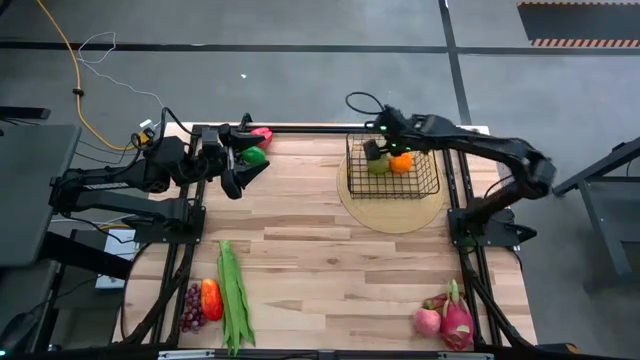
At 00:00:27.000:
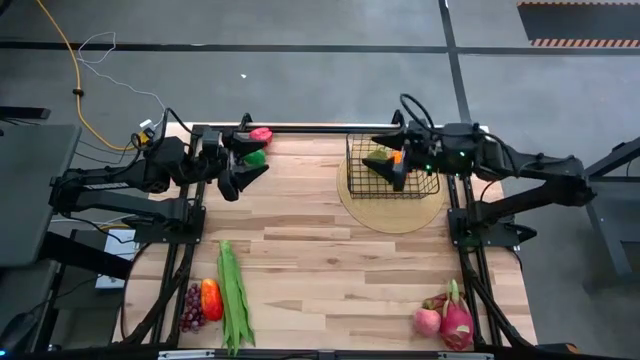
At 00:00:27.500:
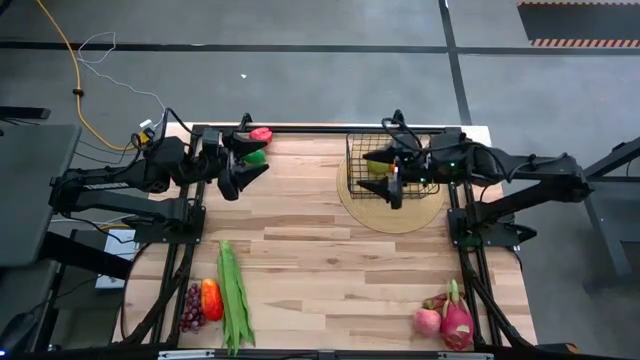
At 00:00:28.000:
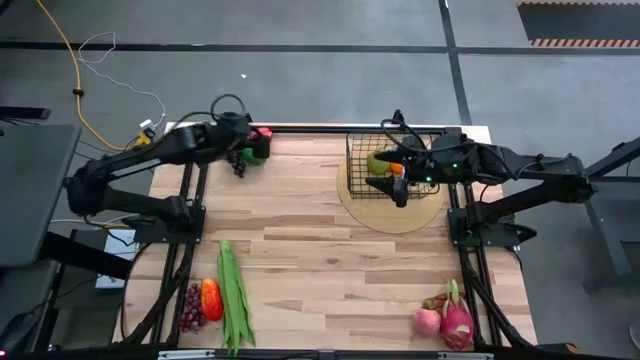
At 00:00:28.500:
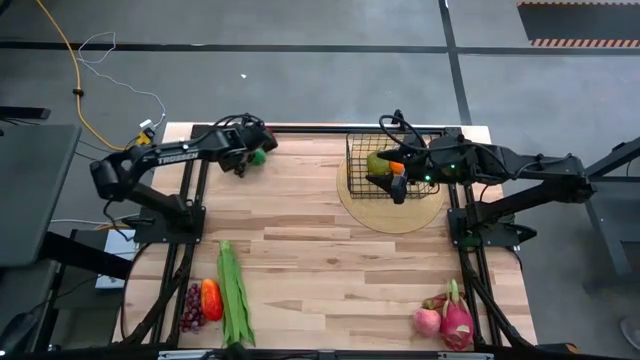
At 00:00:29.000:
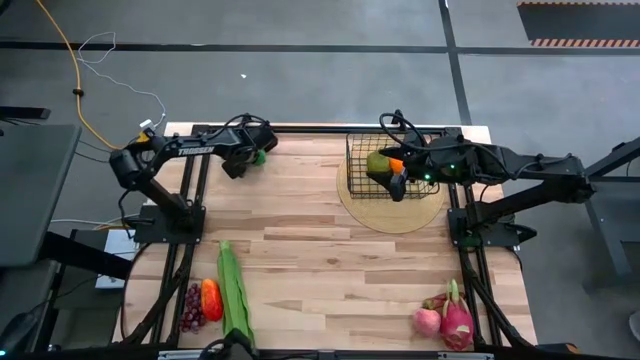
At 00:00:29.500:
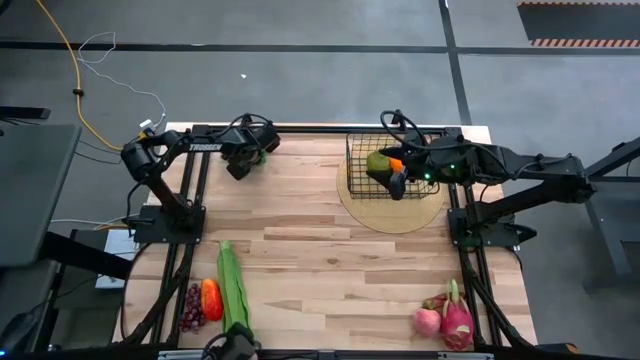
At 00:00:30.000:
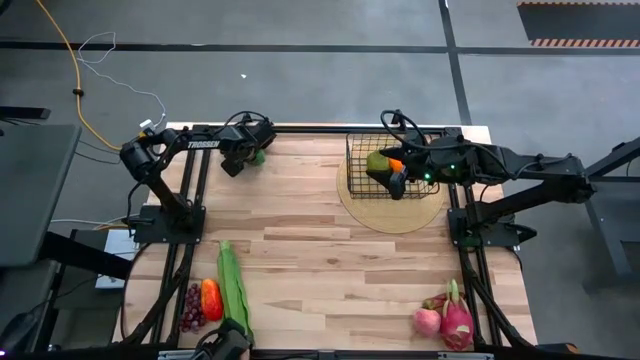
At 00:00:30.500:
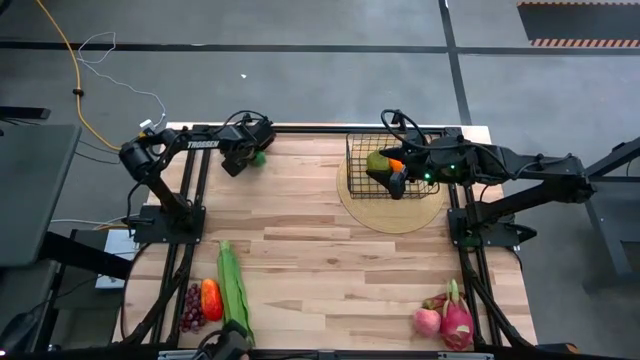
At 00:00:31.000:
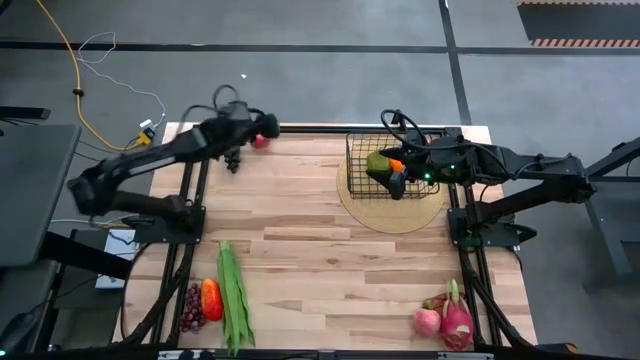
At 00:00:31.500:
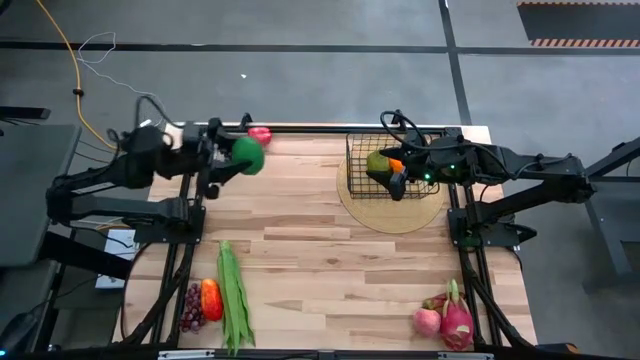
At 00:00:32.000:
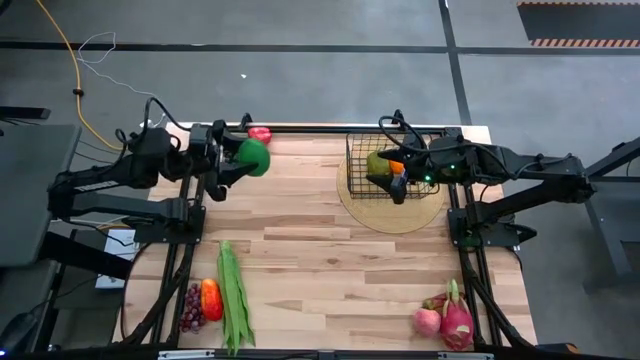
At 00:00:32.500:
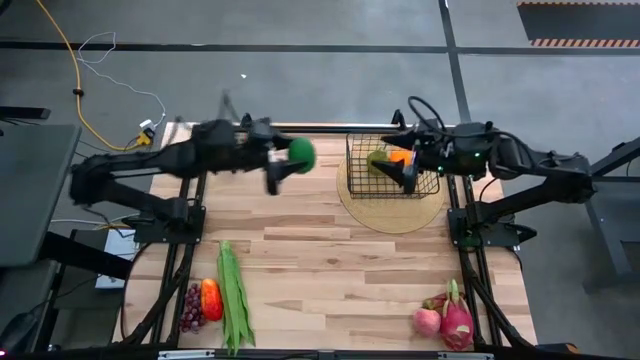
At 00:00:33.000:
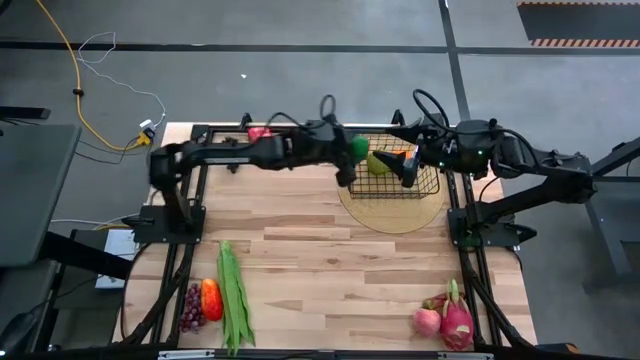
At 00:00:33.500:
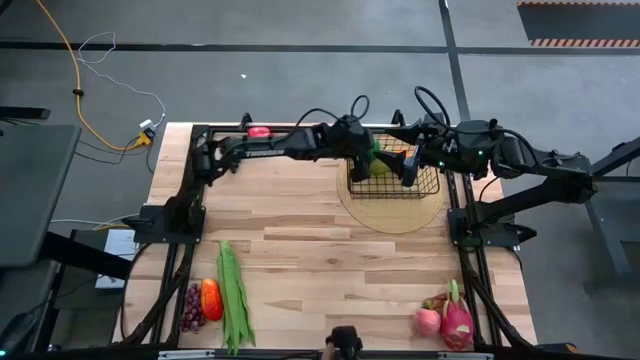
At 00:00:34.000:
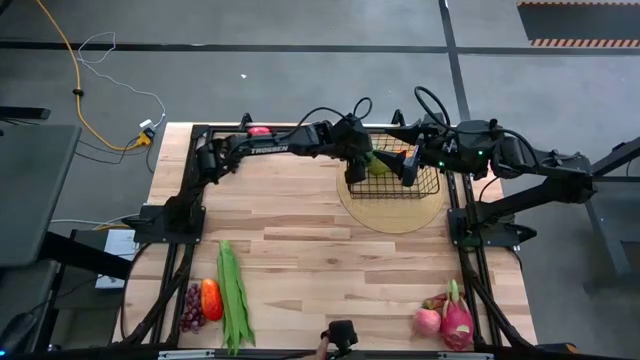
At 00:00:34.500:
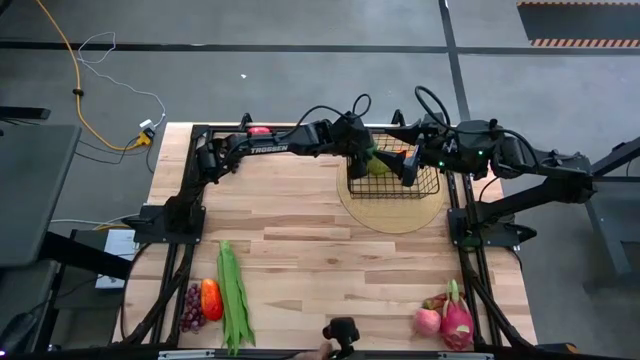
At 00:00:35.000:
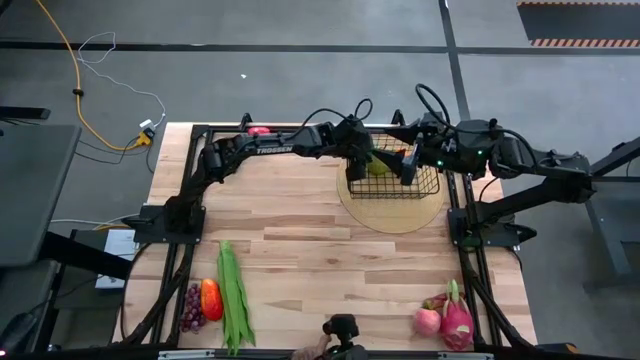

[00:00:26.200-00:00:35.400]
Task: Build produce basket
Put the green lime into the black wire basket

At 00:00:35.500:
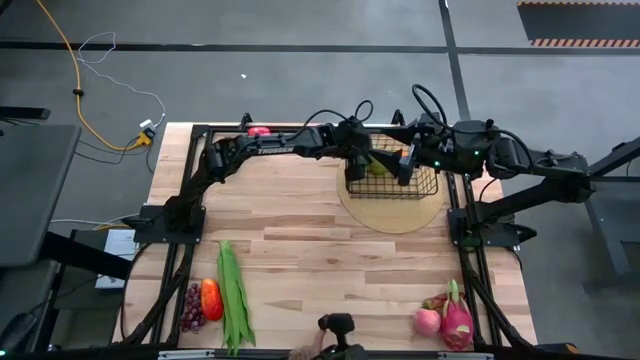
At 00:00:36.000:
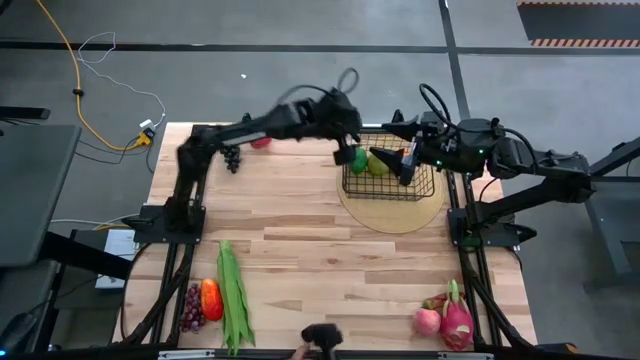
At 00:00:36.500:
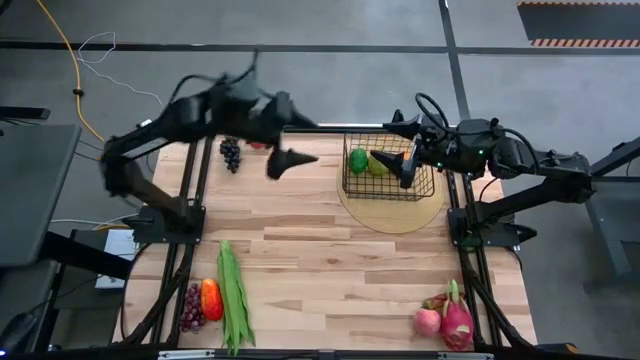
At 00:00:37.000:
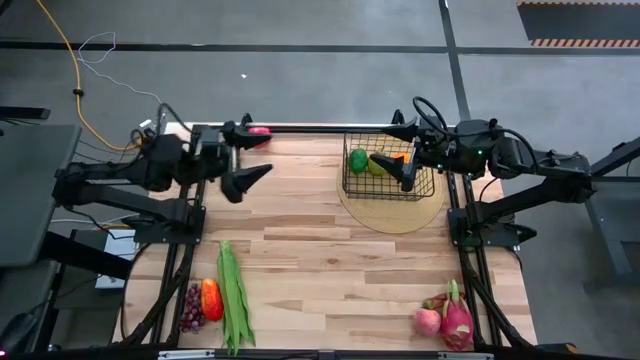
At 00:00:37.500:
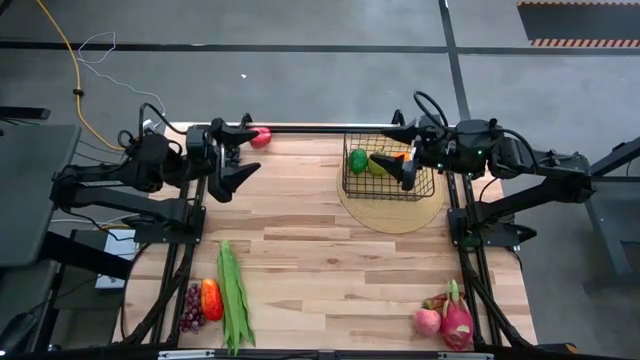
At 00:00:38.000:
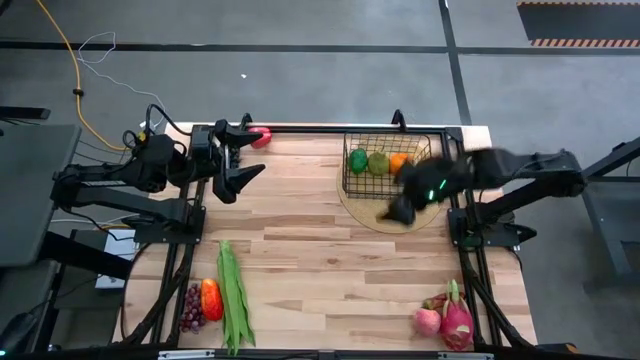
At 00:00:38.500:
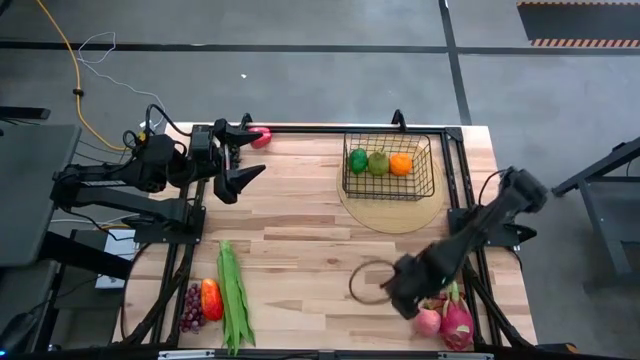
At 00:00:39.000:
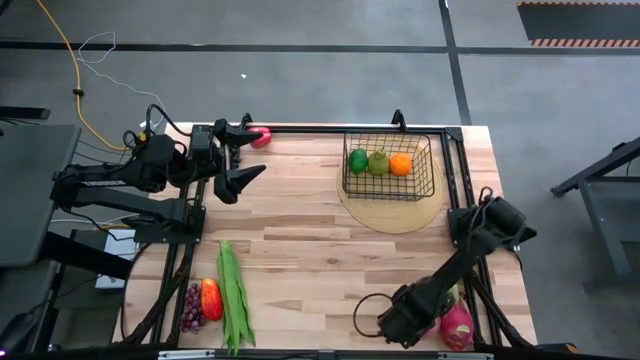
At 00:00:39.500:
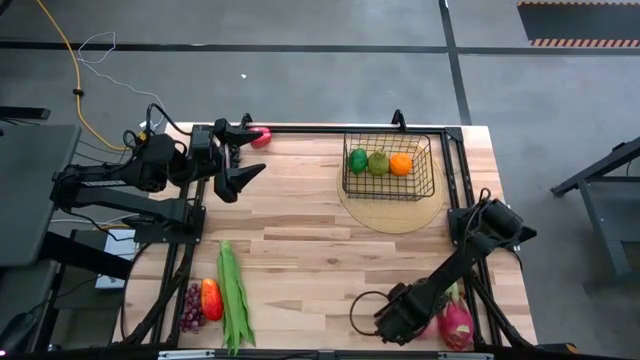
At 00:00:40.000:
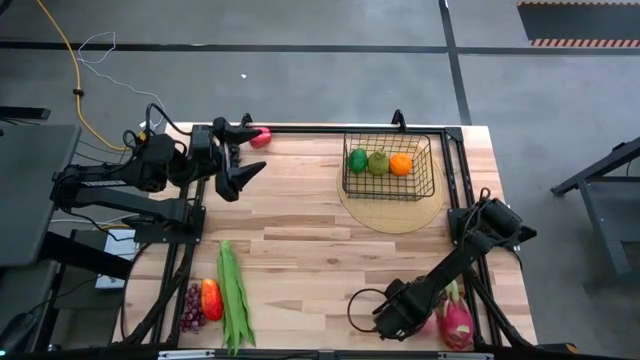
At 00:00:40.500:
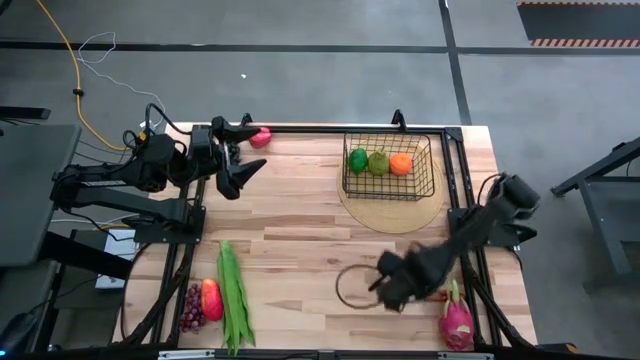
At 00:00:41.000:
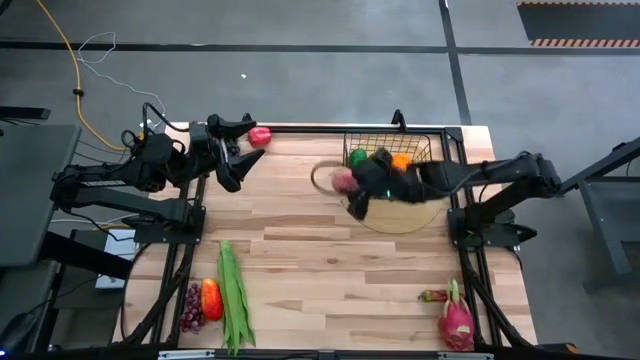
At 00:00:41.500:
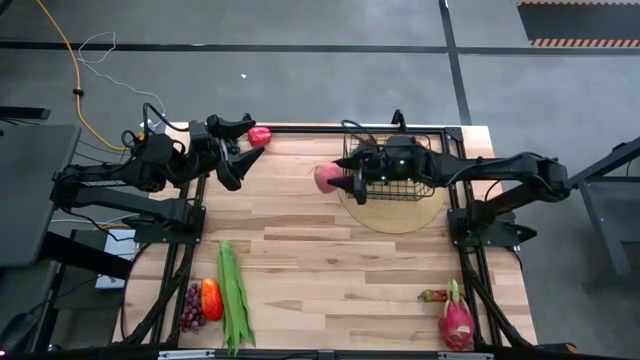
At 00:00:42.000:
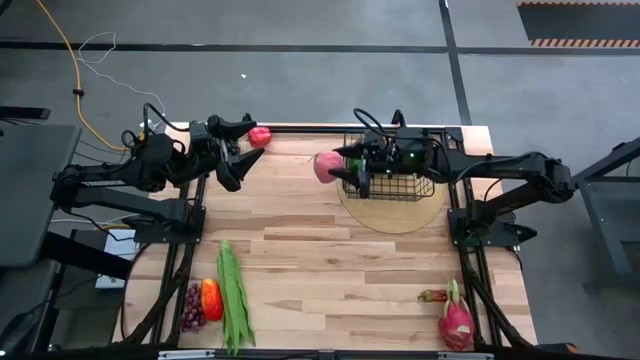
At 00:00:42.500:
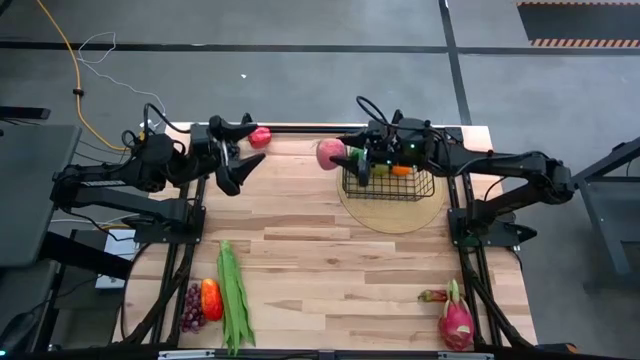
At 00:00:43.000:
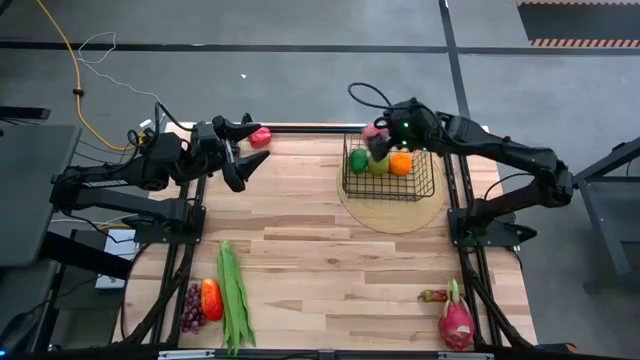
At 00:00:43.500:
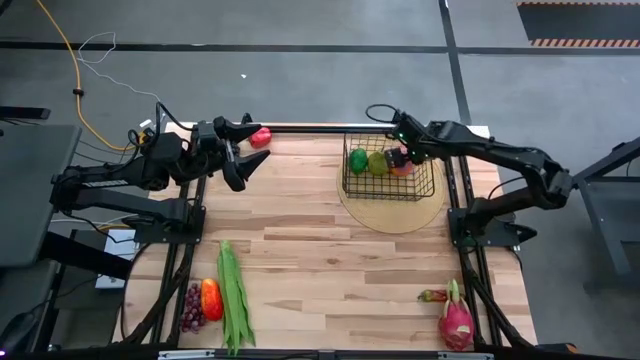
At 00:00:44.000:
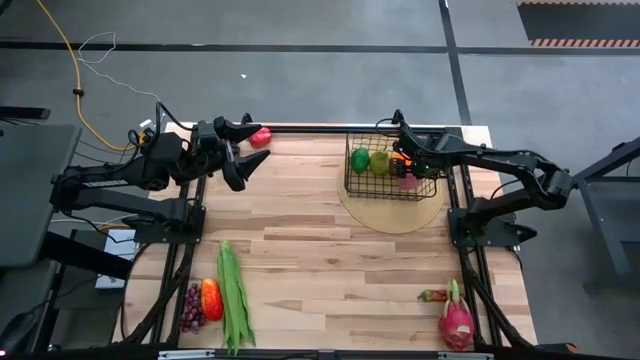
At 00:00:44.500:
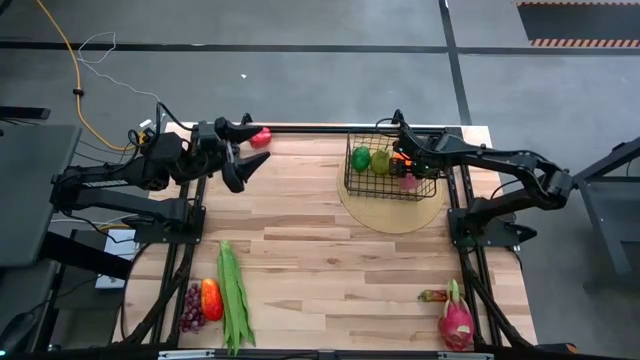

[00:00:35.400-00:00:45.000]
Put the peach into the black wire basket

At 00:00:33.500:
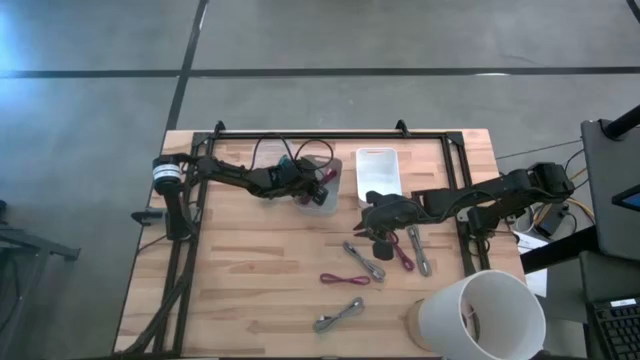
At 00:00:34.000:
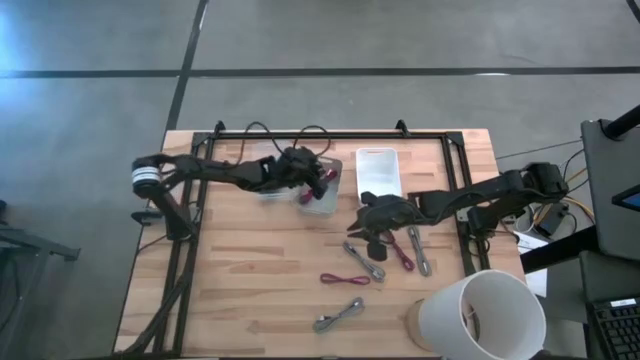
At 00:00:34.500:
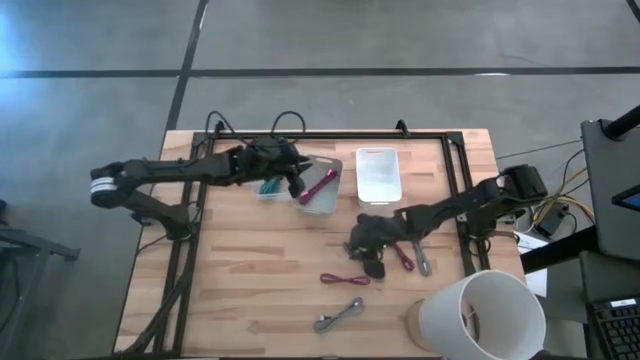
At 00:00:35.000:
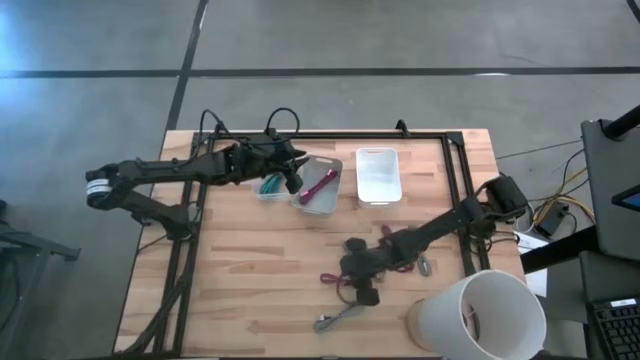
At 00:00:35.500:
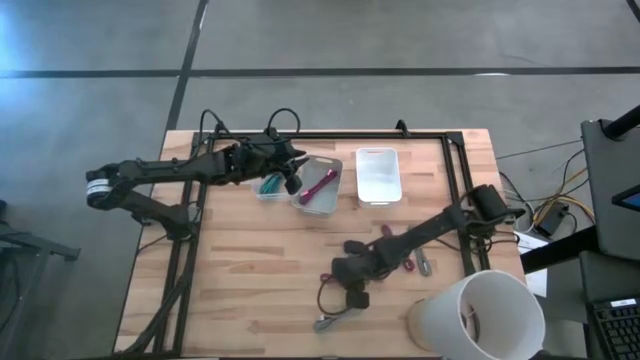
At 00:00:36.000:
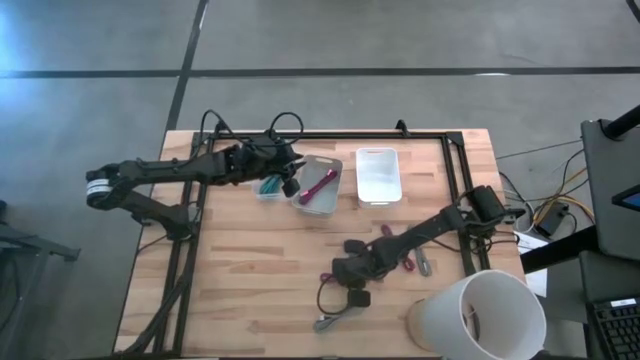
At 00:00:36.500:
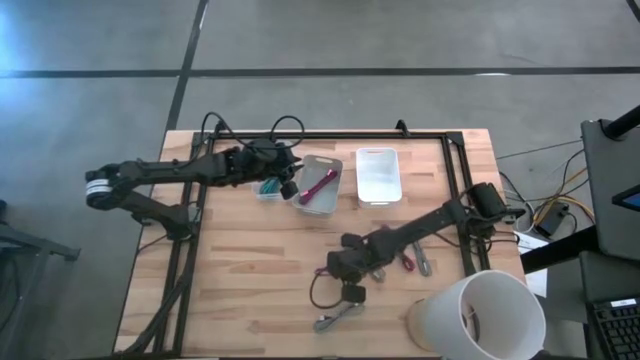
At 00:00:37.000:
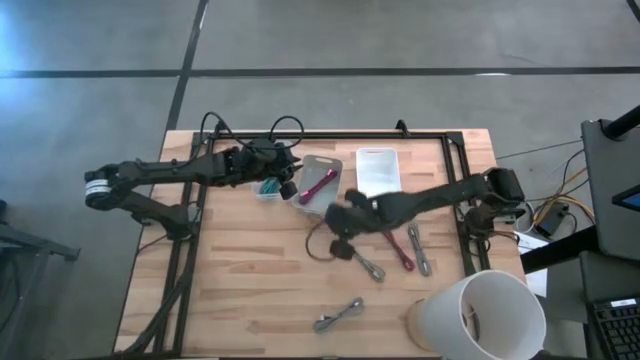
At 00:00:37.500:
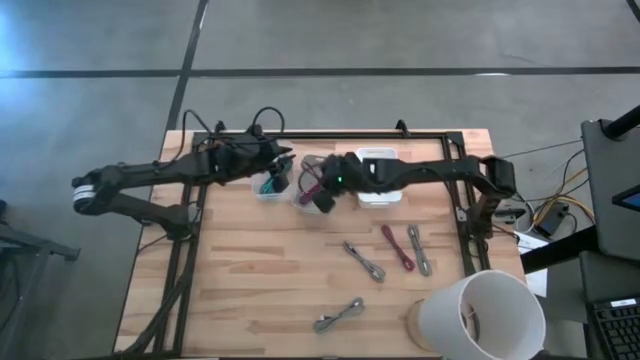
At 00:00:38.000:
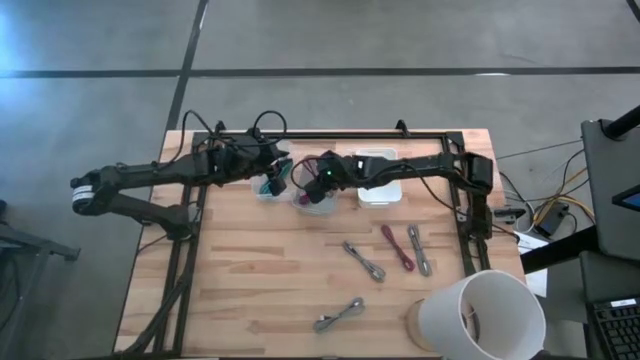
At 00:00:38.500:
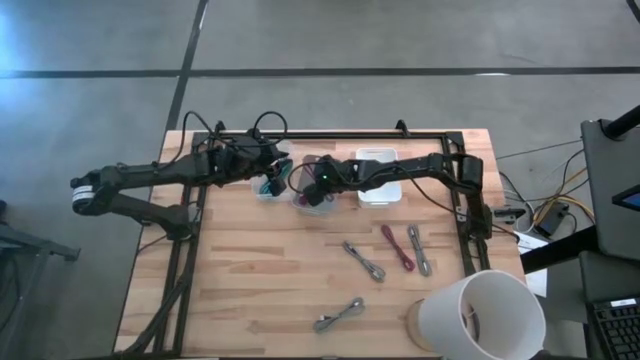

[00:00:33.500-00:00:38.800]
Task: Pick & Place USB Port
Put the left pink charger cable into the gray bin
